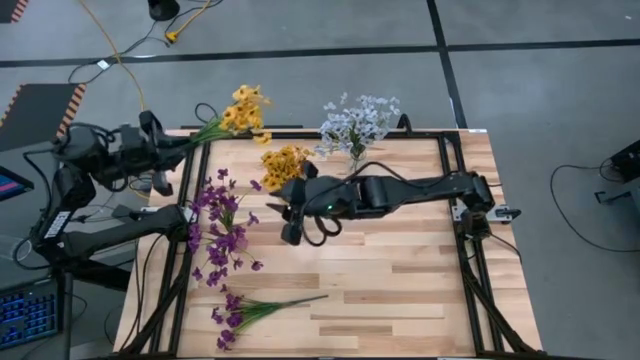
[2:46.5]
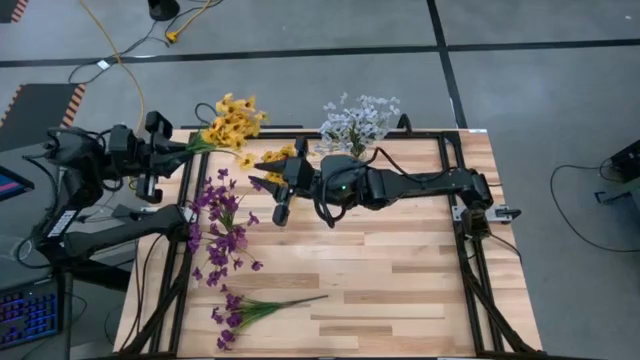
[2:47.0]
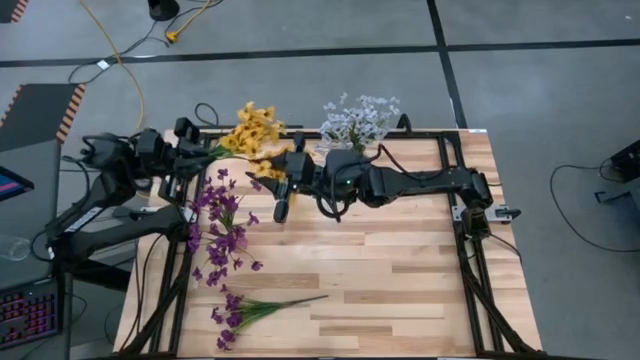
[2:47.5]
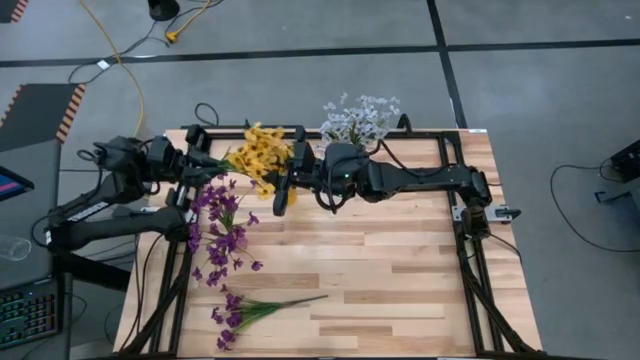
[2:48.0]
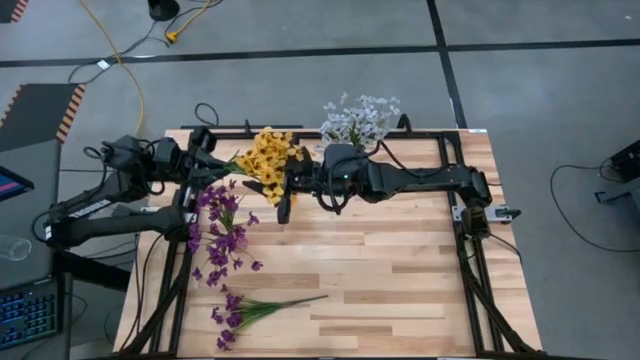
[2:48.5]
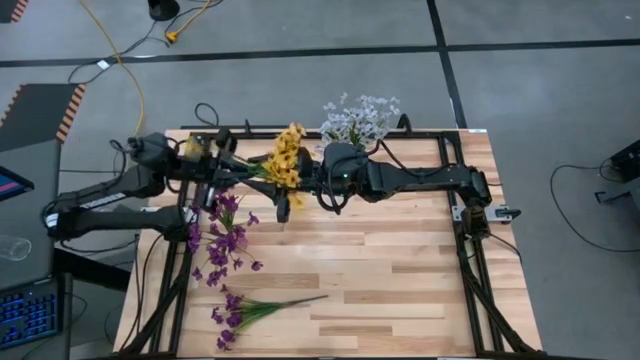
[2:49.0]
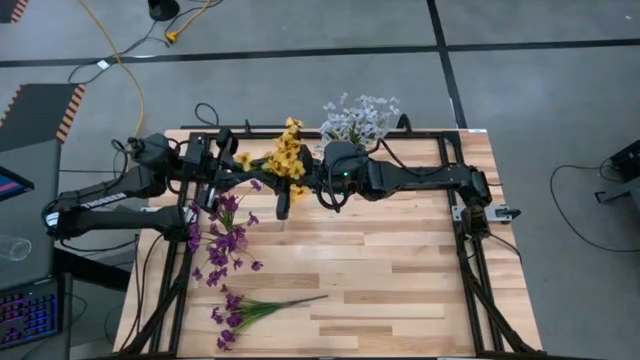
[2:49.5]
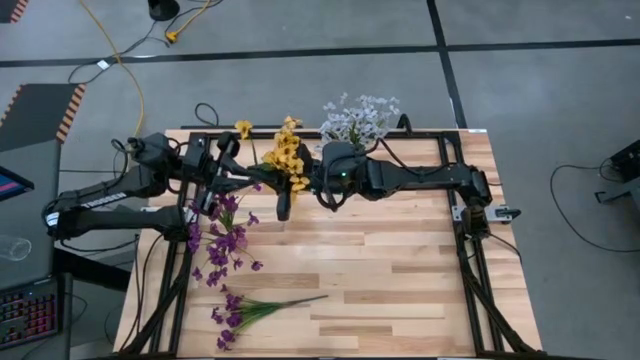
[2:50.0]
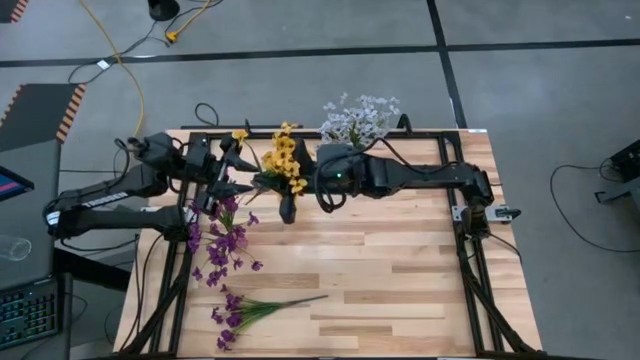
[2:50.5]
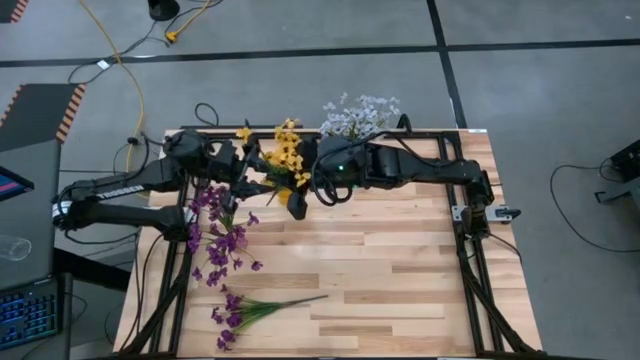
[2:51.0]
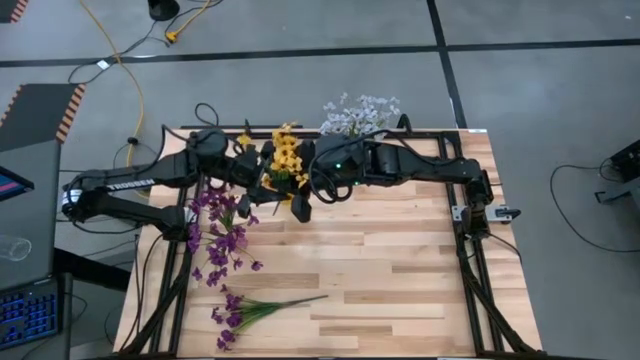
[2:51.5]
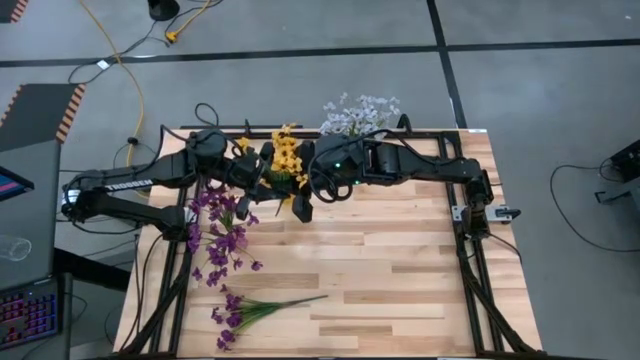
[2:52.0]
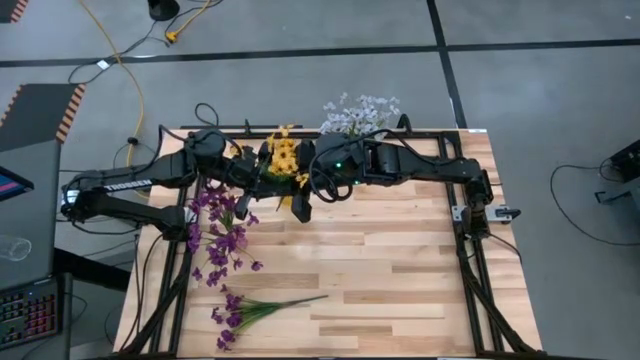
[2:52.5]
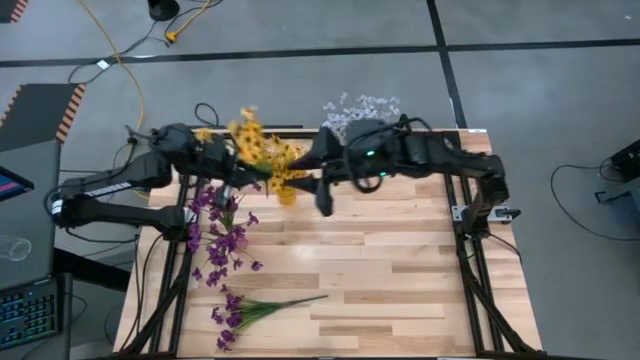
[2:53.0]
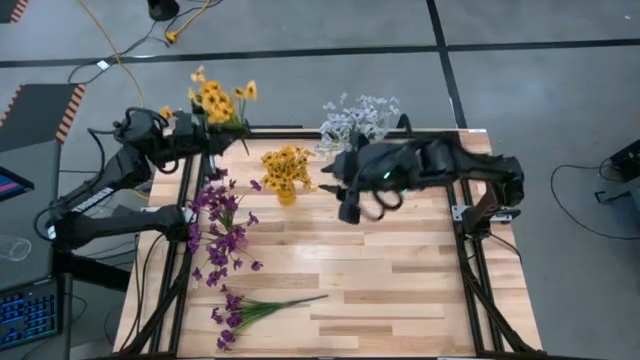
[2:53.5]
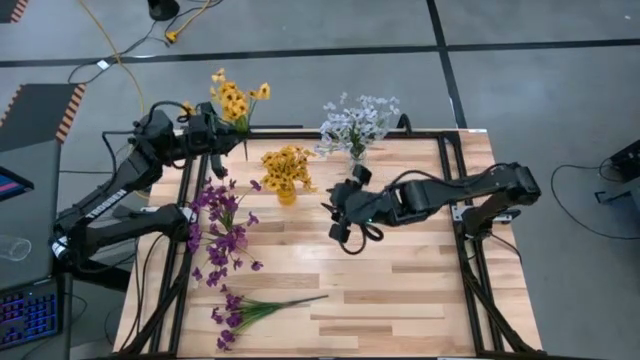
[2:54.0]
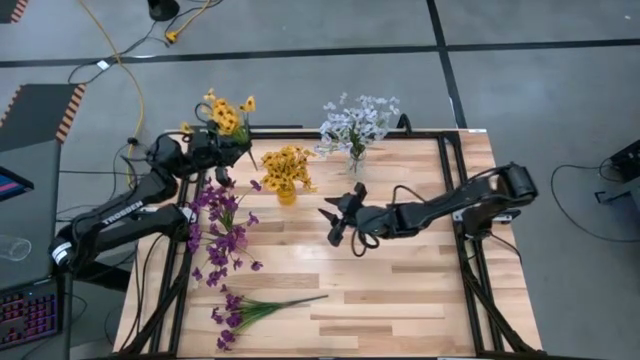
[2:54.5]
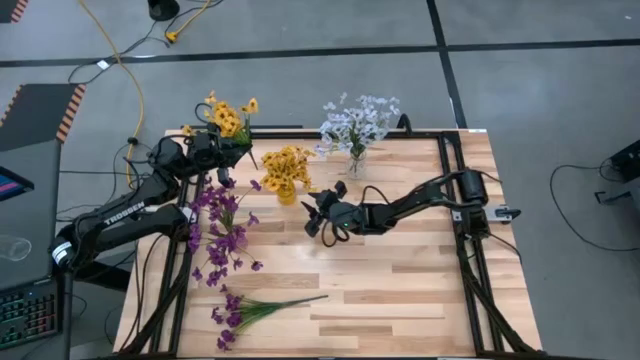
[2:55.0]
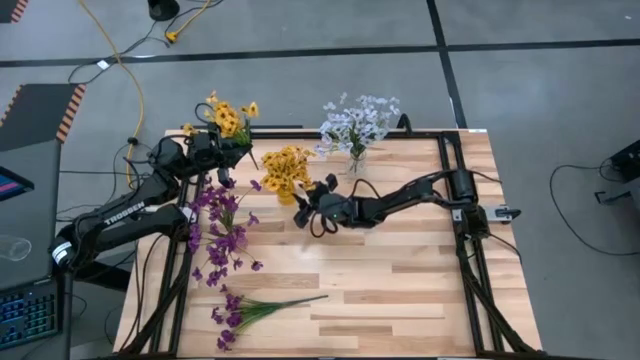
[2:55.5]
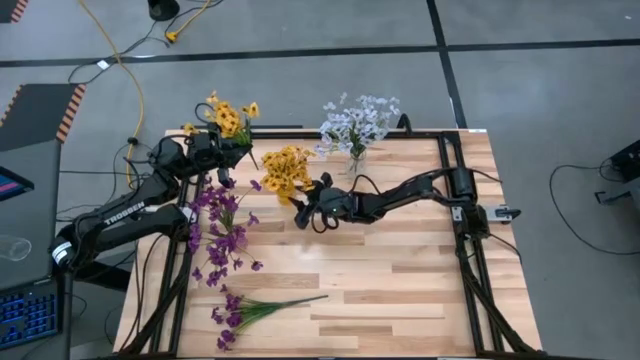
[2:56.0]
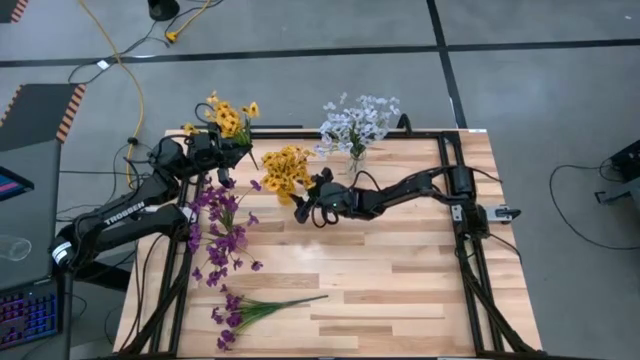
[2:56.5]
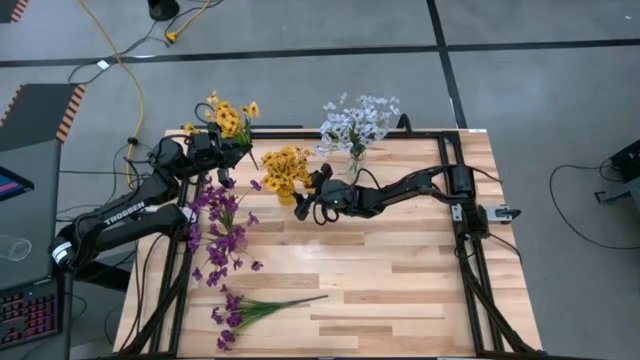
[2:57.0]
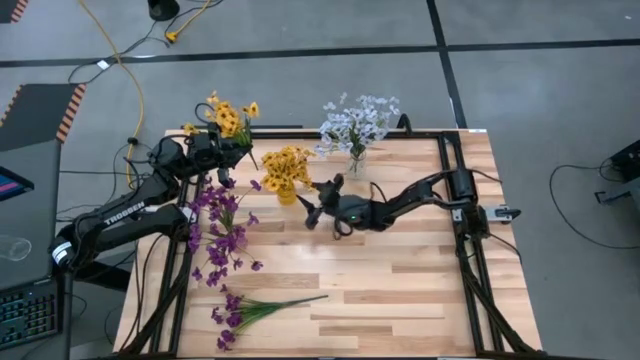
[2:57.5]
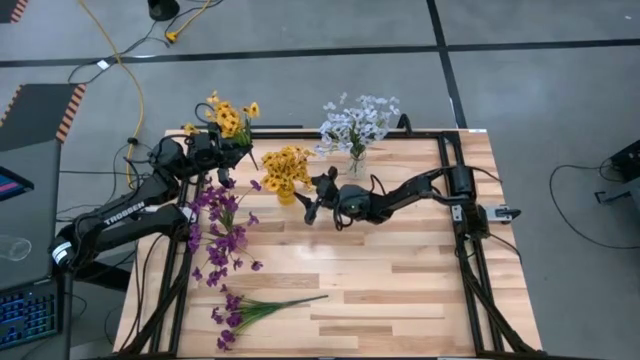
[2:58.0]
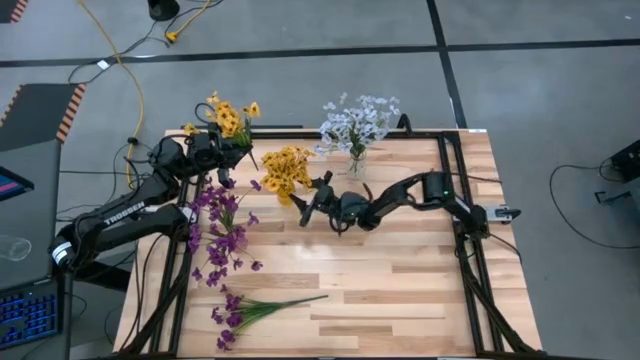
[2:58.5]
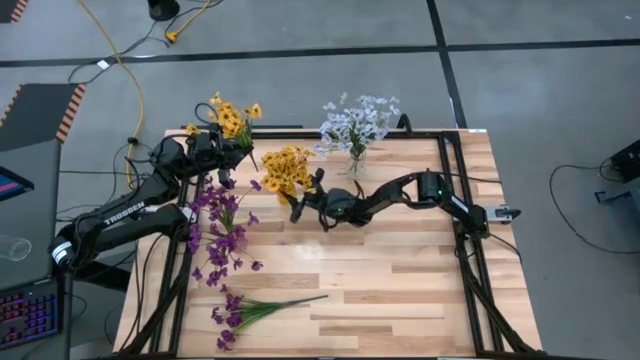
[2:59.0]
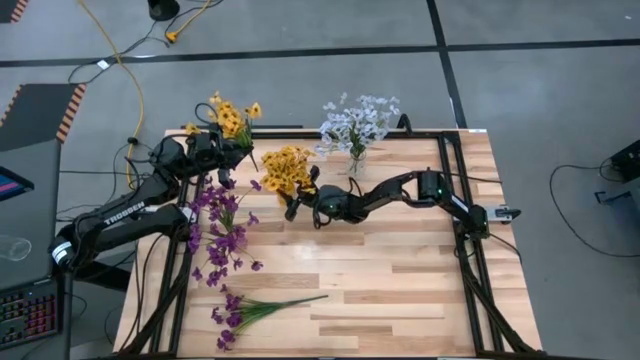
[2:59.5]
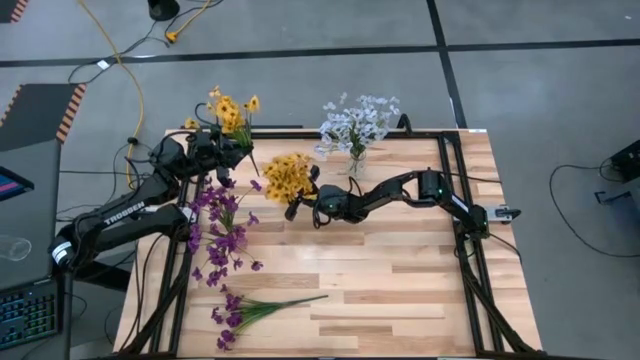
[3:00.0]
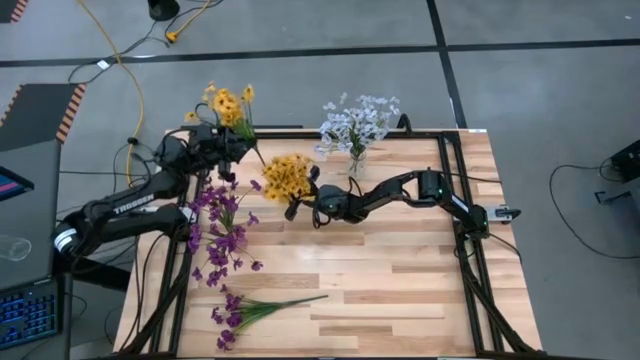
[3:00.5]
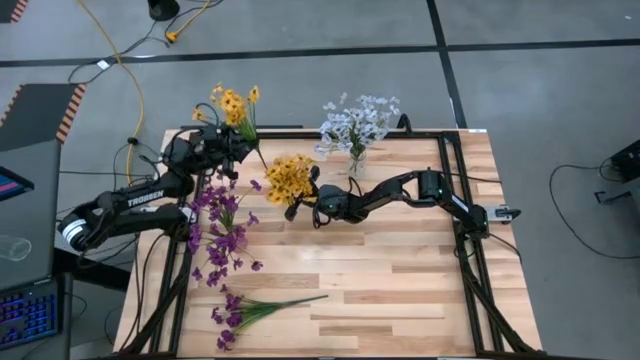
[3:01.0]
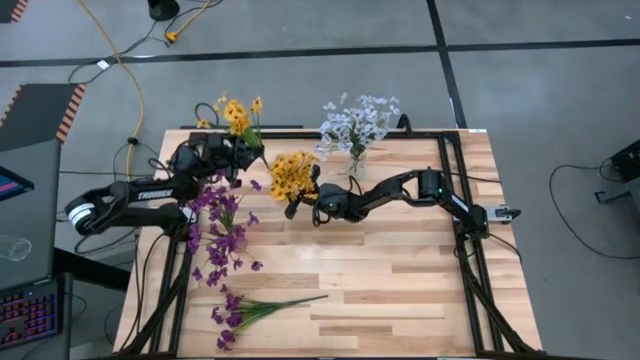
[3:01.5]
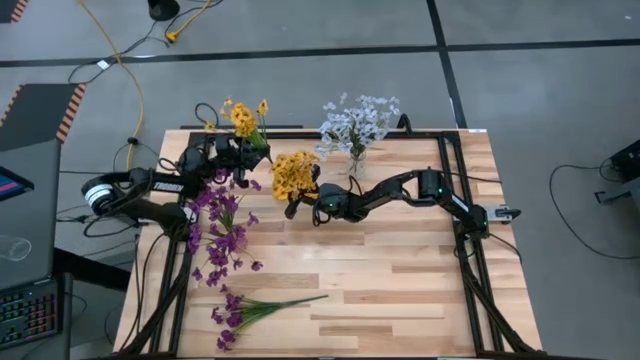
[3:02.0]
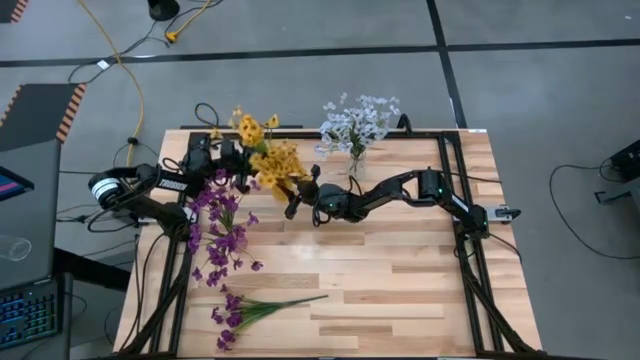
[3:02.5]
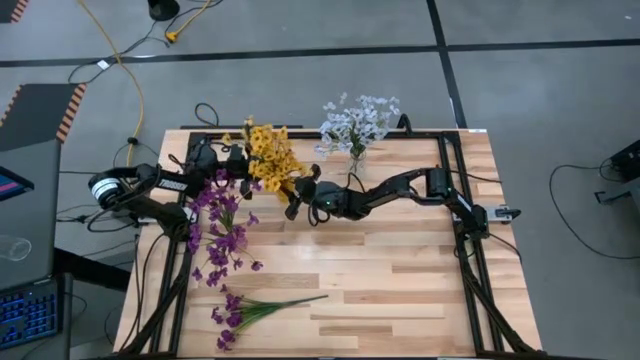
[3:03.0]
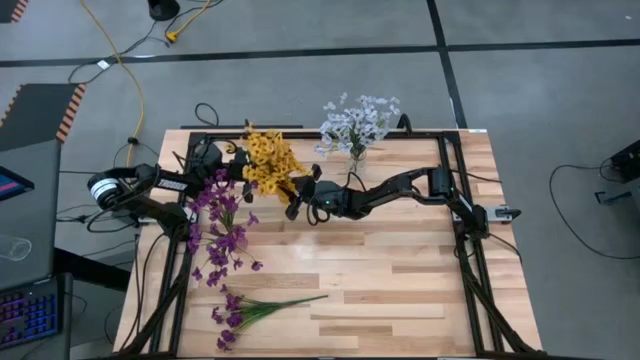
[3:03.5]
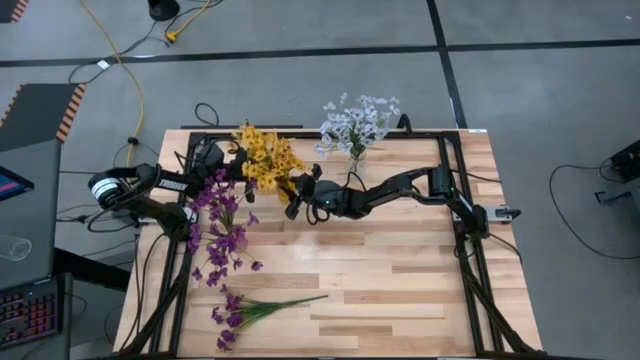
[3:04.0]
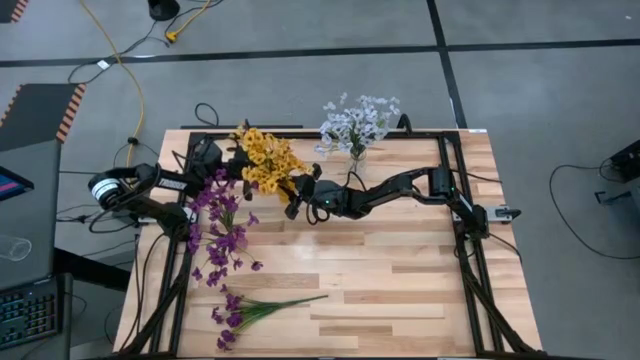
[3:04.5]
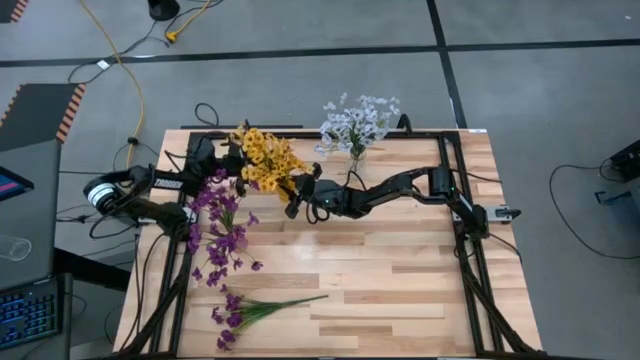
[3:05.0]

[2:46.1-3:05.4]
Task: Sort flowers into vase by color
Put the yellow flowers into the yellow vase

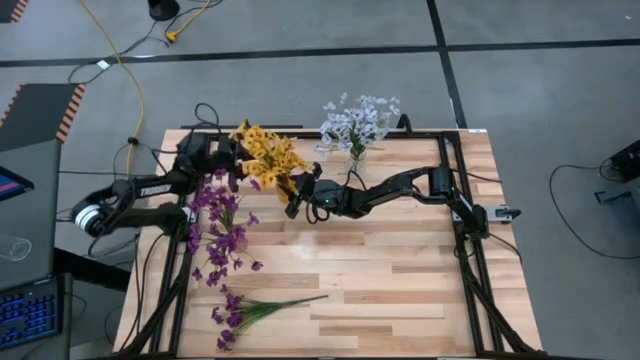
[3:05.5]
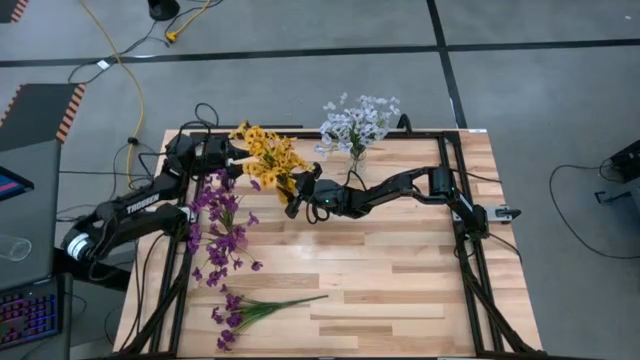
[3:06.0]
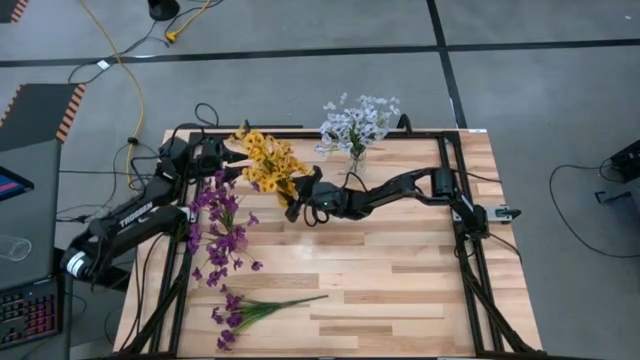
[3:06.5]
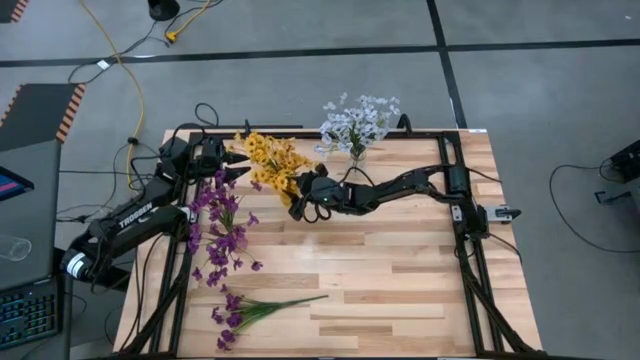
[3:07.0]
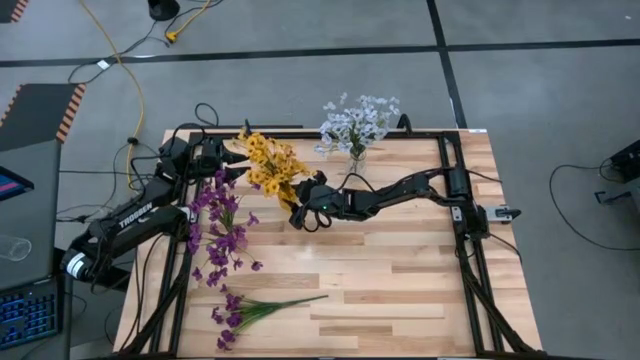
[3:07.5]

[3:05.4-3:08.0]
Adjust the yellow vase
